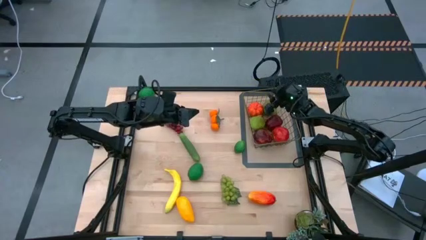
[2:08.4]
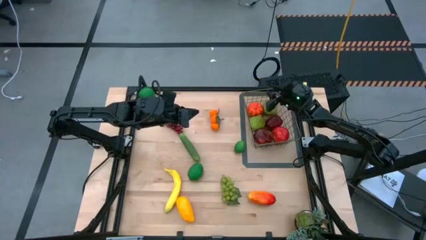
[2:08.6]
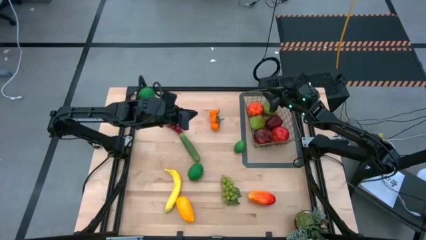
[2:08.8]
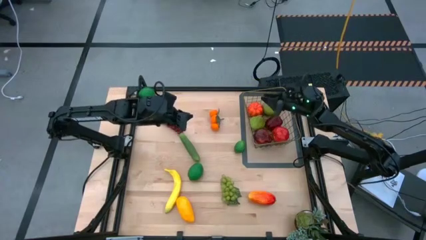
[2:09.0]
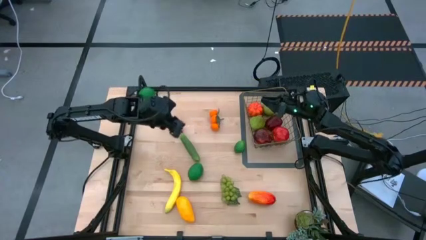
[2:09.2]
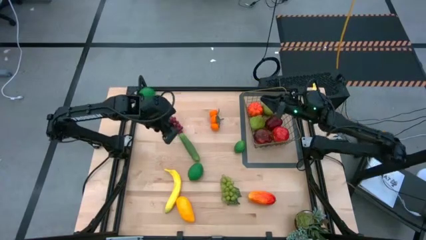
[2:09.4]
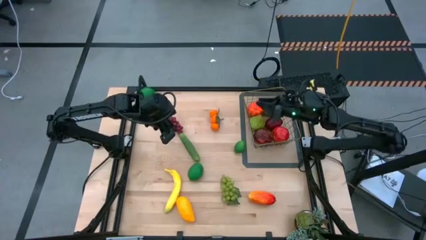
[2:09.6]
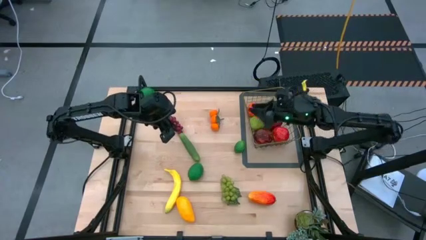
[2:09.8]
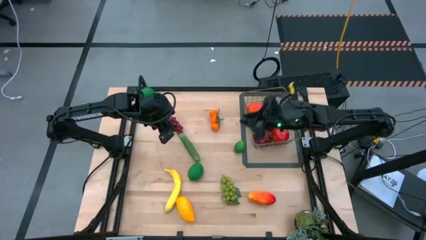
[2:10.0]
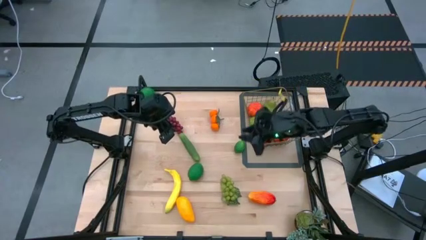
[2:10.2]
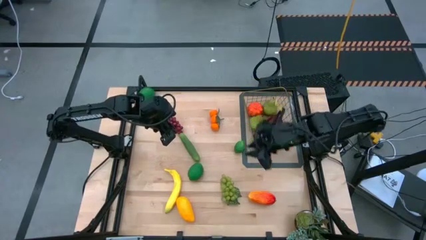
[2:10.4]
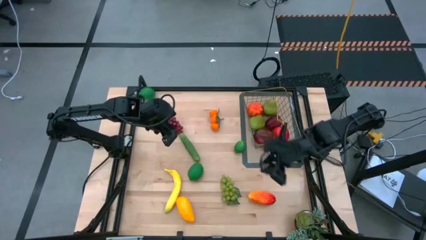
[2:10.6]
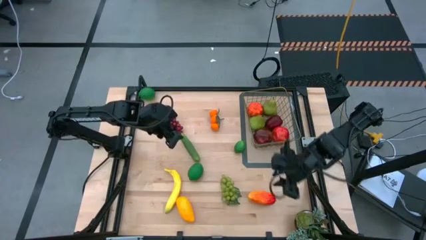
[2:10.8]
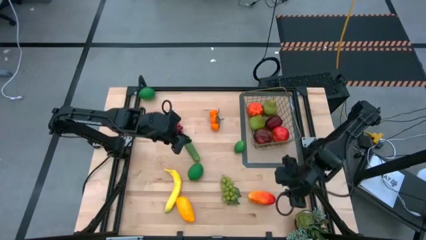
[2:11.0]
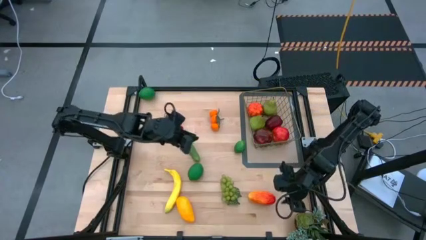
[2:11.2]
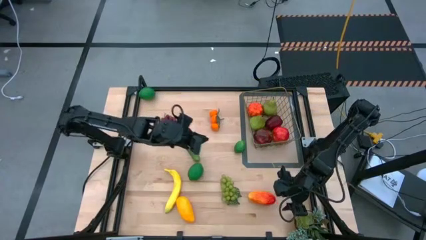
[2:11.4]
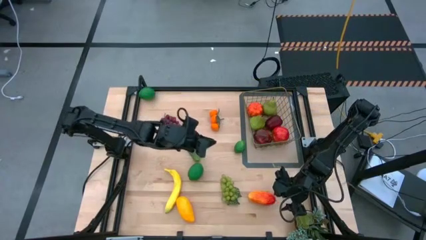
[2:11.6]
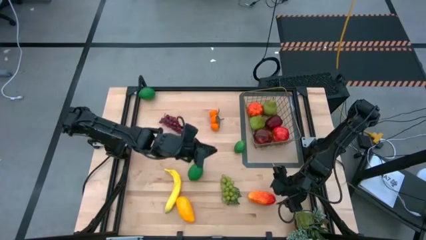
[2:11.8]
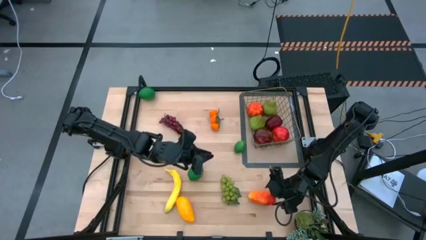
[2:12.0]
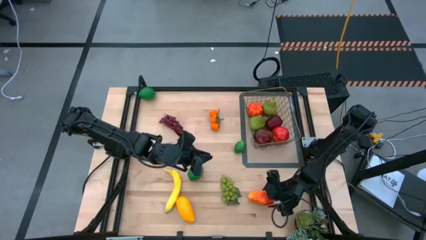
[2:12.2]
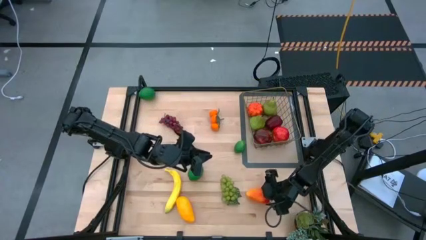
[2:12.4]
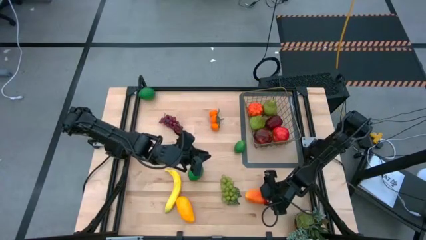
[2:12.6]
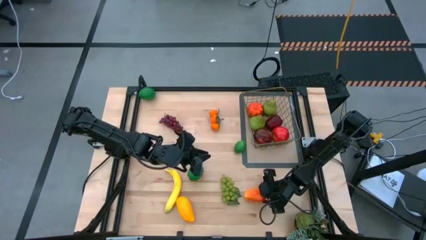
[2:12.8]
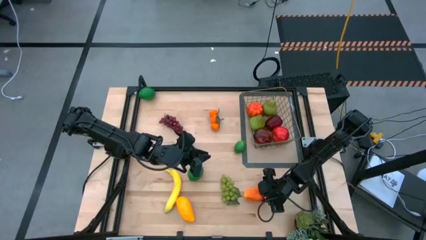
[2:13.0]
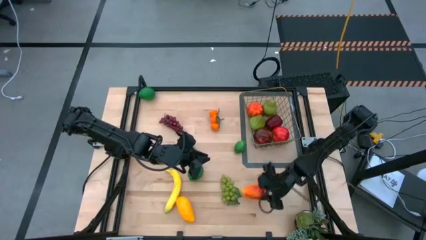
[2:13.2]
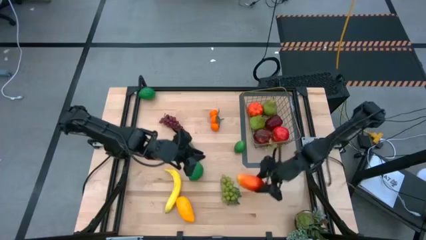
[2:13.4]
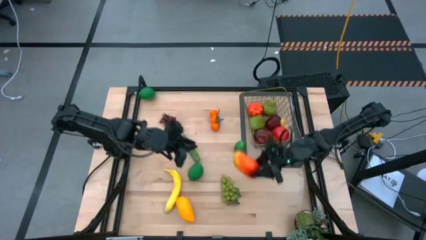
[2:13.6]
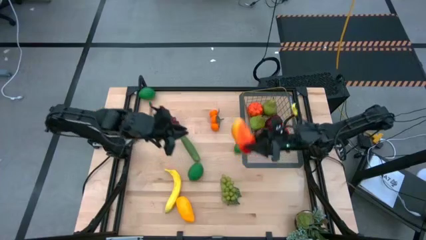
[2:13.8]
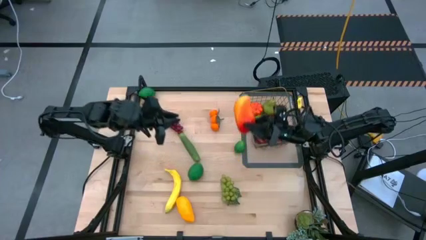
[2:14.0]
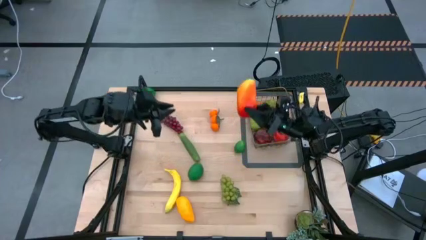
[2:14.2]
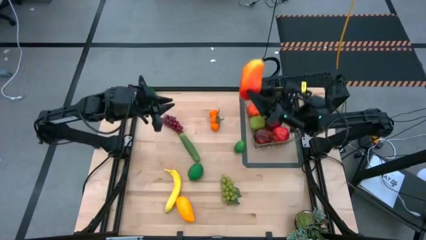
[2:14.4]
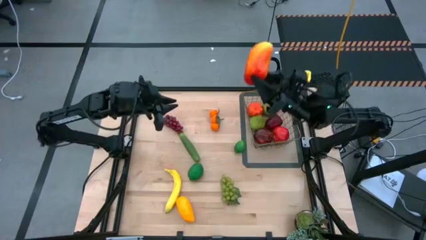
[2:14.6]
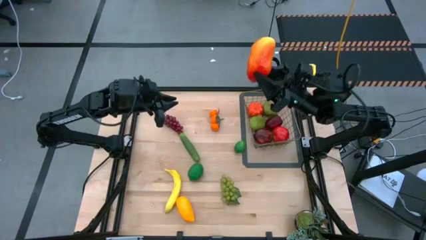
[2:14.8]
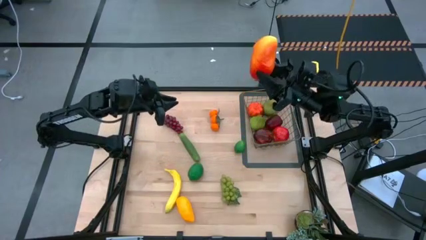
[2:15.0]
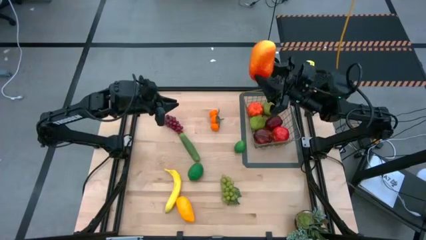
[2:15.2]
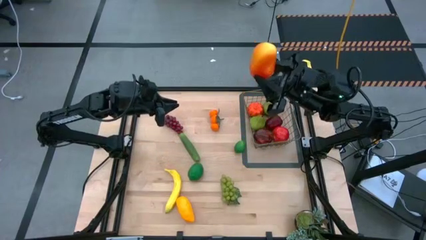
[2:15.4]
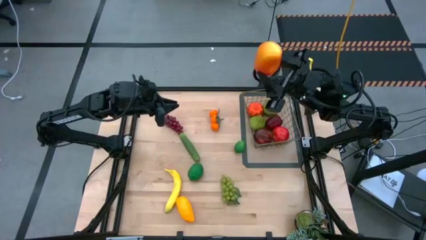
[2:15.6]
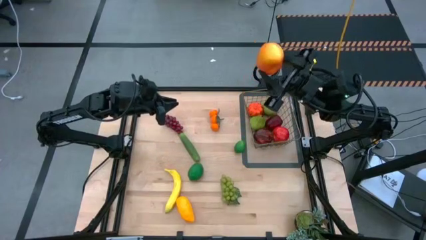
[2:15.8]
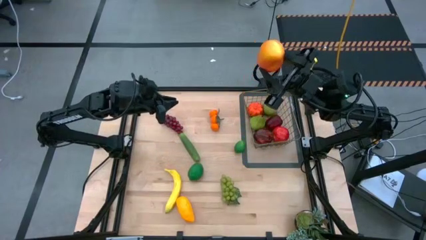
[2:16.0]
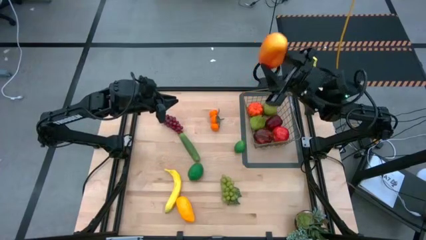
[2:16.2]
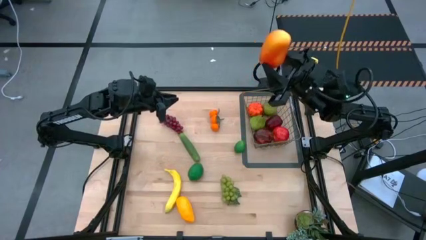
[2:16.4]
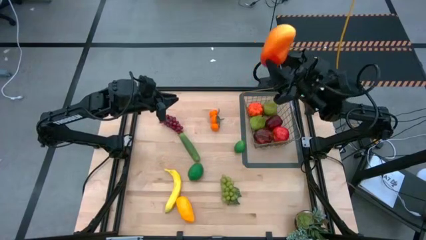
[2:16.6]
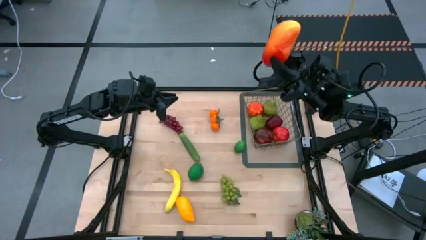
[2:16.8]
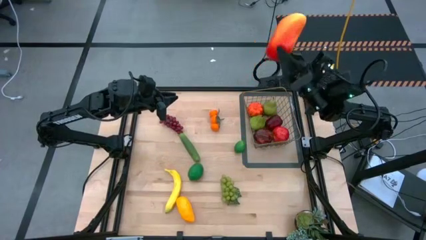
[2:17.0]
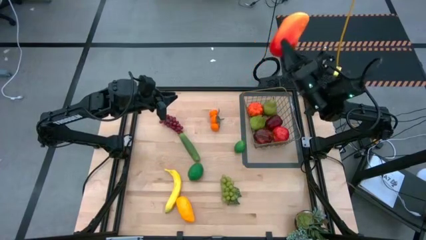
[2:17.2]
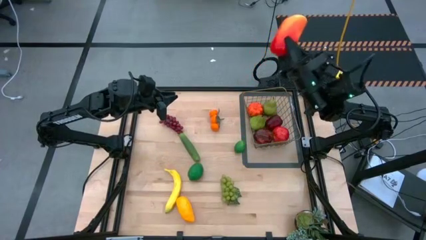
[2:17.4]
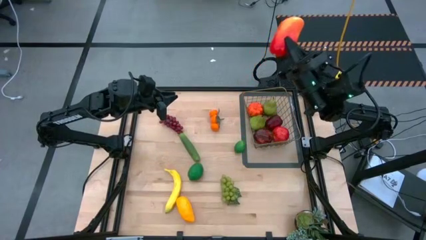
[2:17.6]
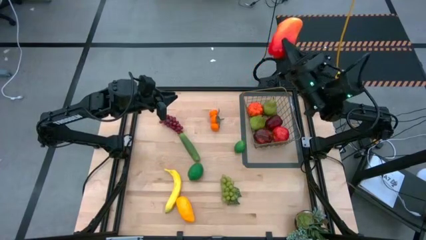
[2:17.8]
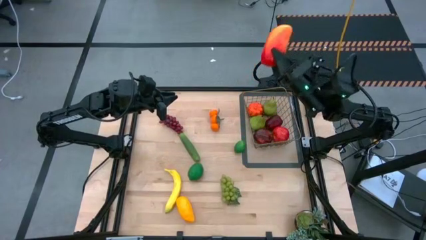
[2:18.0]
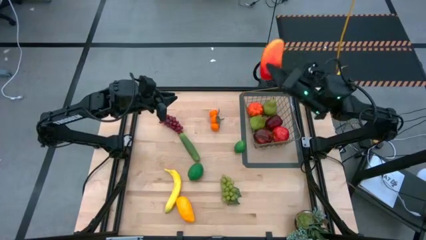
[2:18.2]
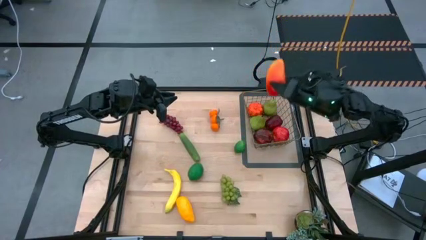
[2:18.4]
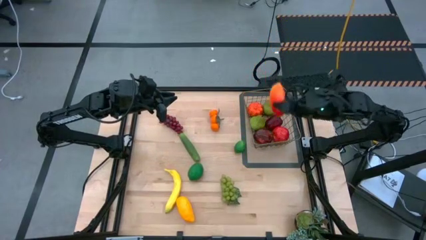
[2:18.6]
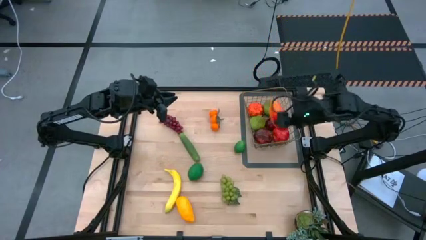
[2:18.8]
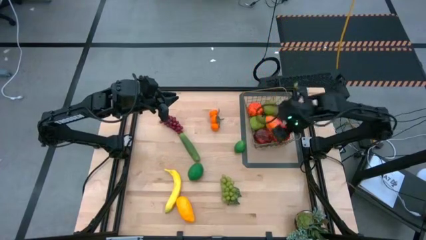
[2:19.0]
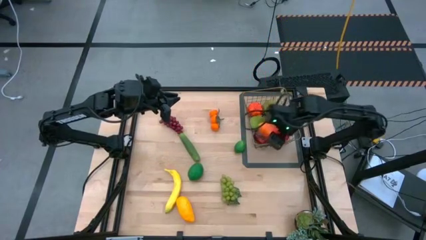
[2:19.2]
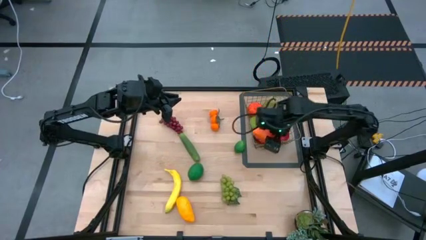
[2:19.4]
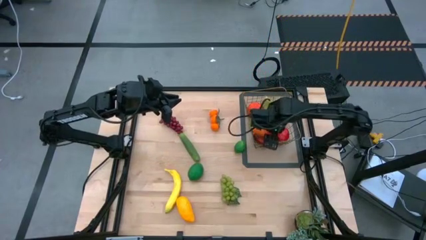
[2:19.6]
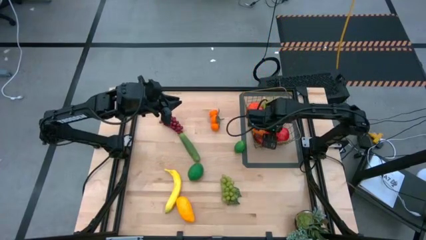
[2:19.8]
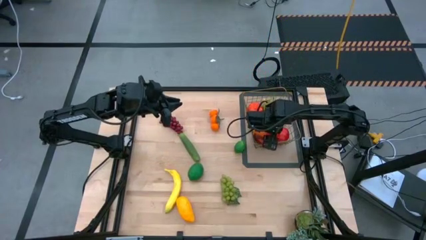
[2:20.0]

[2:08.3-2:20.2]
Task: Build produce basket
Put the orange mango into the wire basket

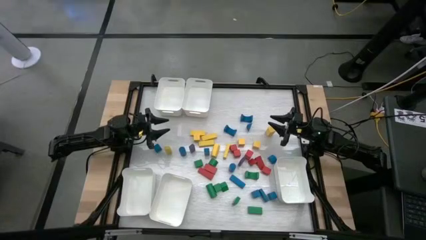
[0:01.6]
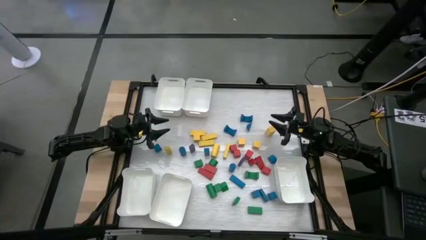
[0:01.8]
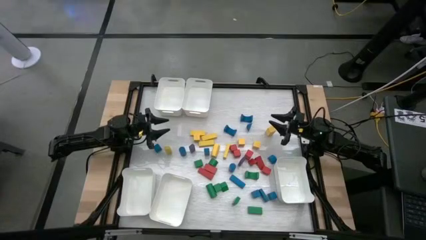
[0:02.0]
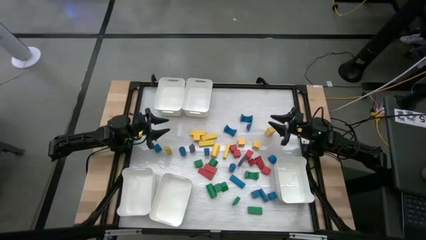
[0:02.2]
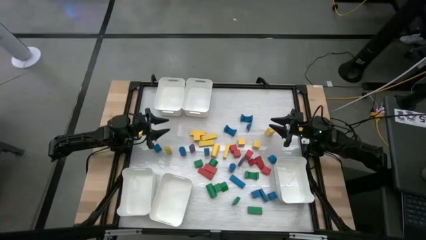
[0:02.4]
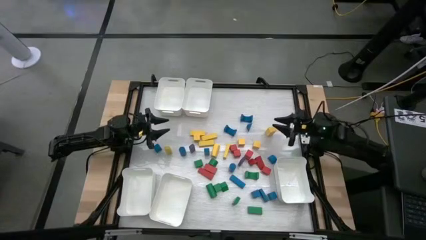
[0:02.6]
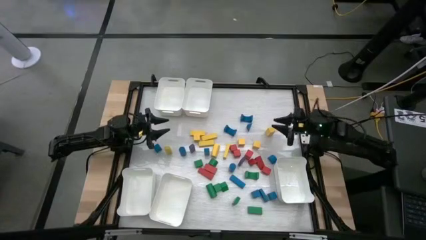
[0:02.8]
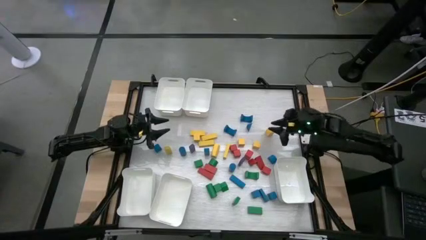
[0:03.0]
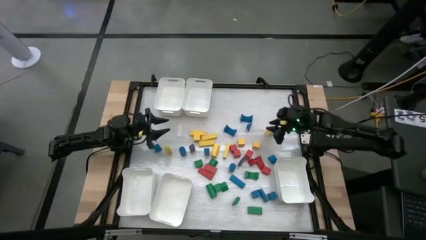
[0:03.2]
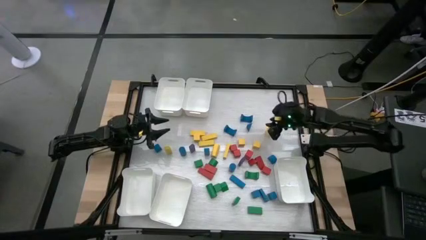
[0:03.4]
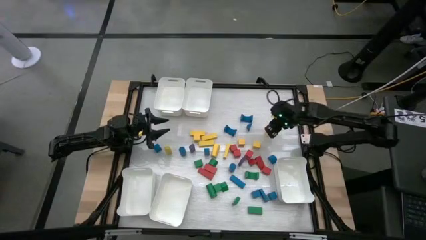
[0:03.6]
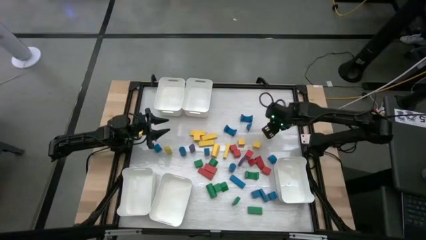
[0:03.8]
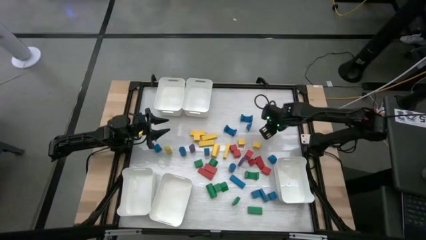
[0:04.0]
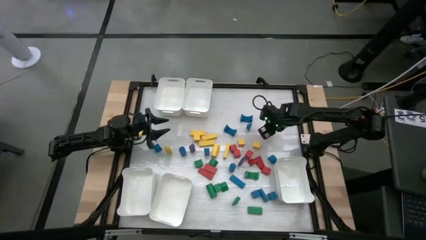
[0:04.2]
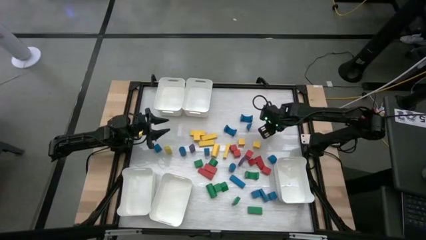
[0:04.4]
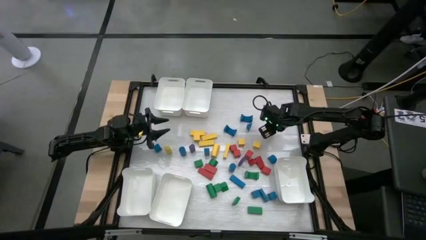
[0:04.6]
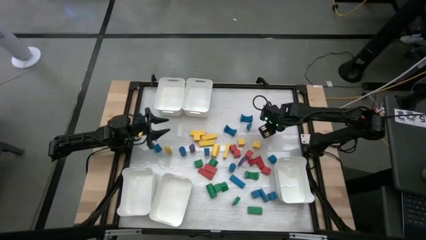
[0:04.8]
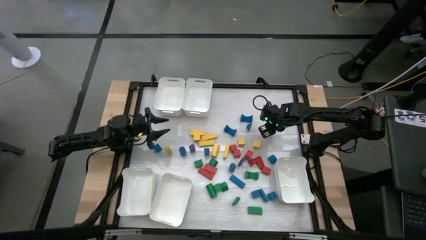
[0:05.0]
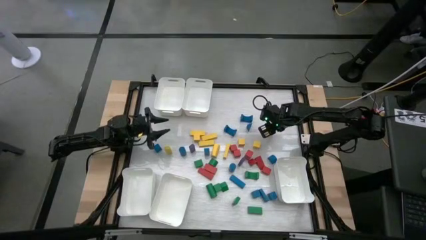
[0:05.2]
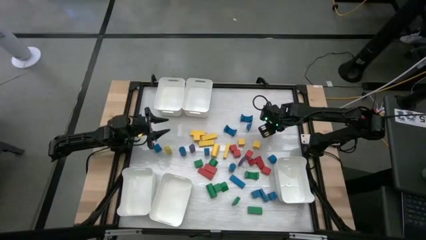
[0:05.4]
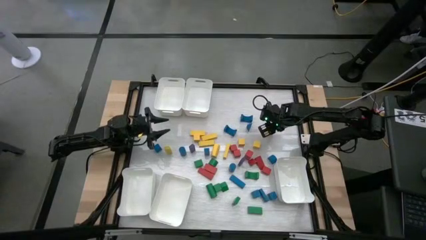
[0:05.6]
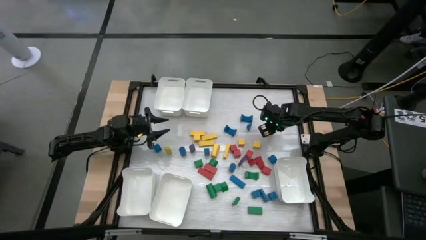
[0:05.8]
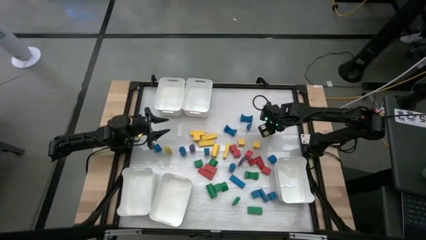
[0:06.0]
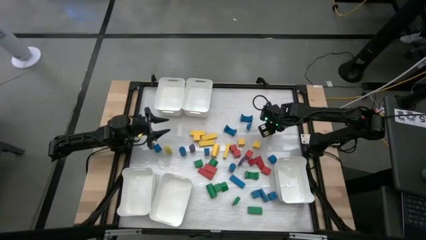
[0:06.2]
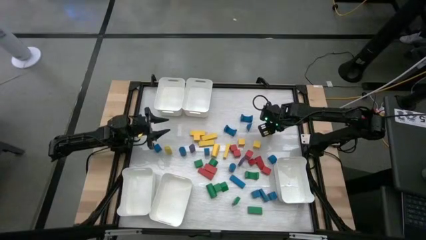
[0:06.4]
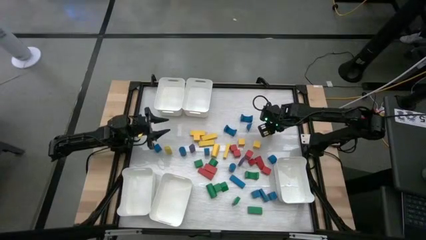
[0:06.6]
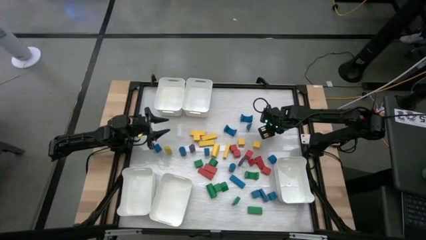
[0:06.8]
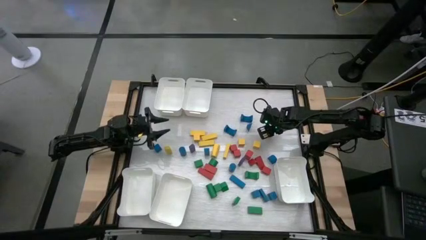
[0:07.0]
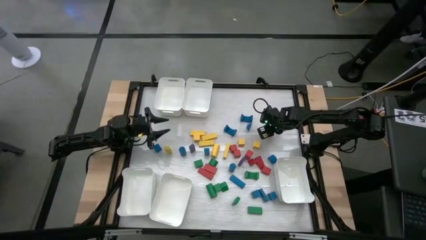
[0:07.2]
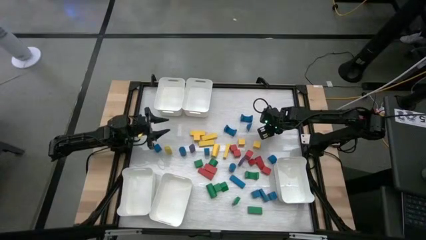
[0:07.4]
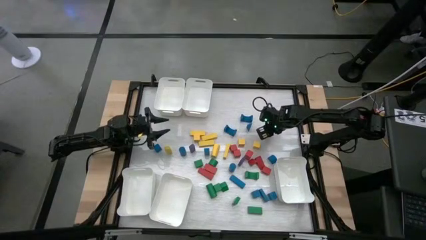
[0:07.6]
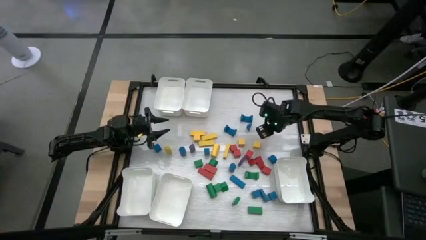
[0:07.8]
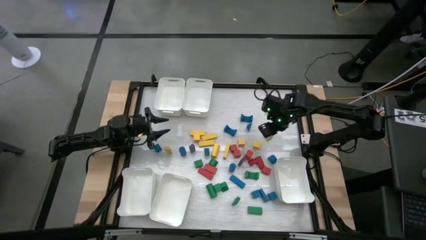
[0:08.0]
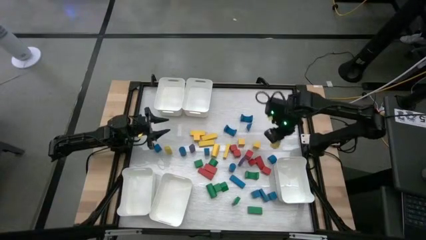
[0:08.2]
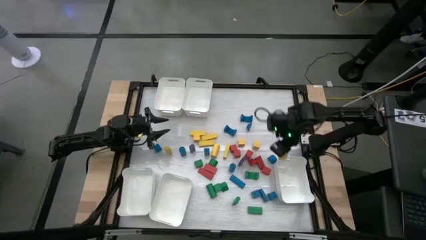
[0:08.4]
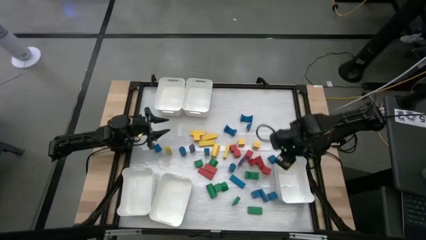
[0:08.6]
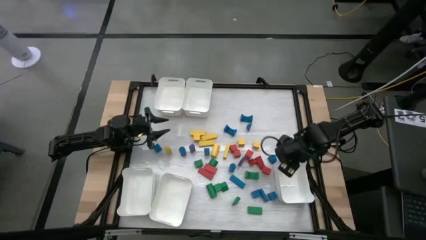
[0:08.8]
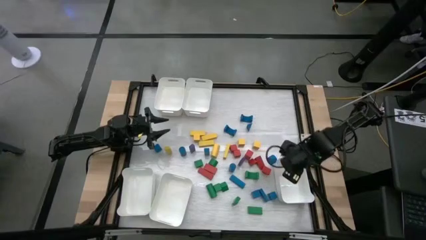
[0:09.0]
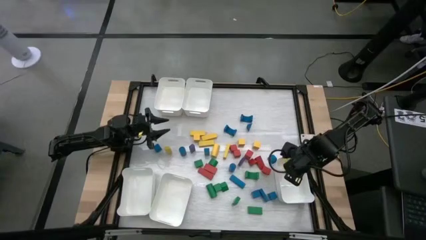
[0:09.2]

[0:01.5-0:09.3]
Task: Sort blocks
Put the yellow block into the bottom right white bin
